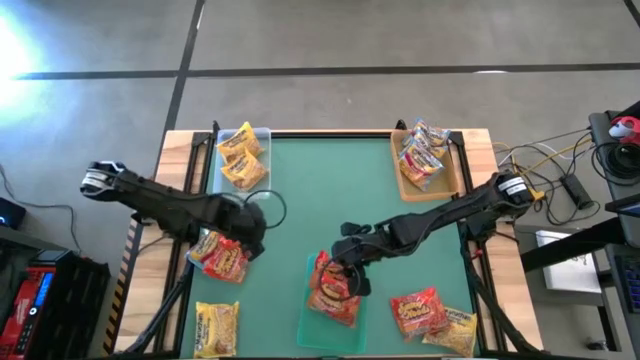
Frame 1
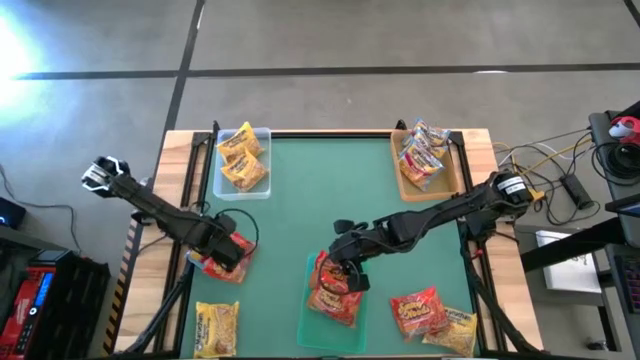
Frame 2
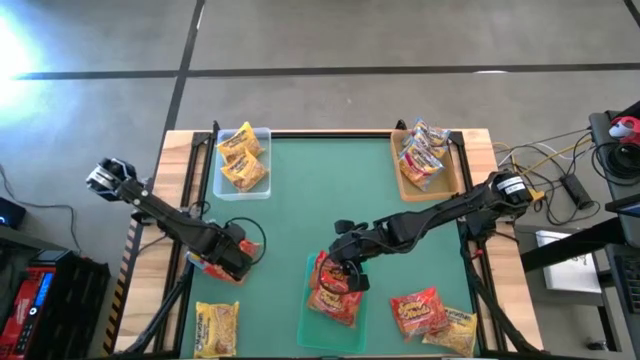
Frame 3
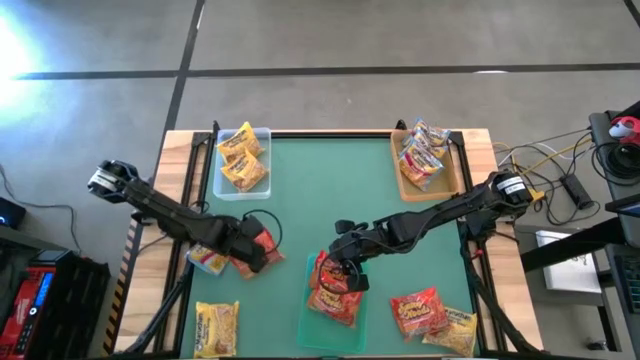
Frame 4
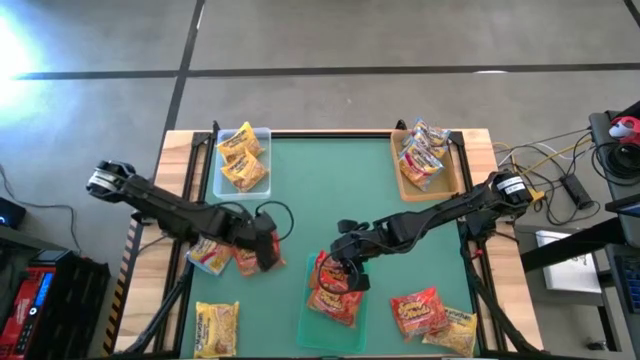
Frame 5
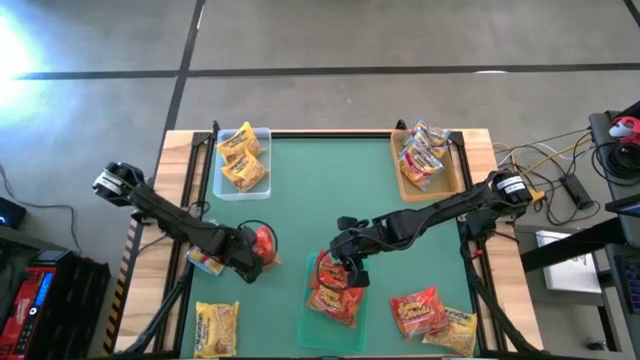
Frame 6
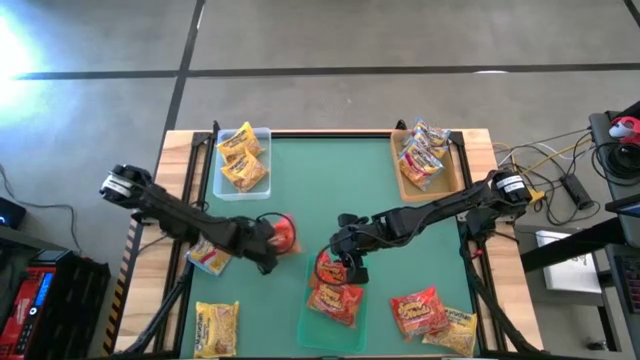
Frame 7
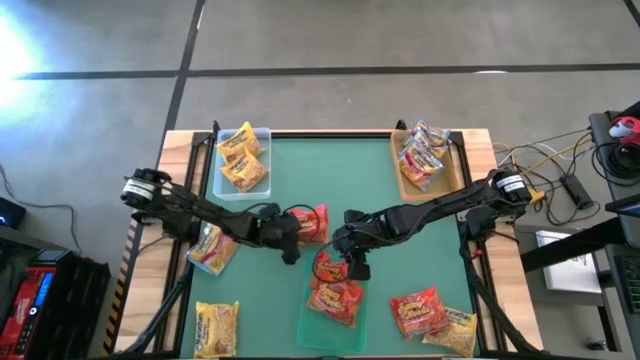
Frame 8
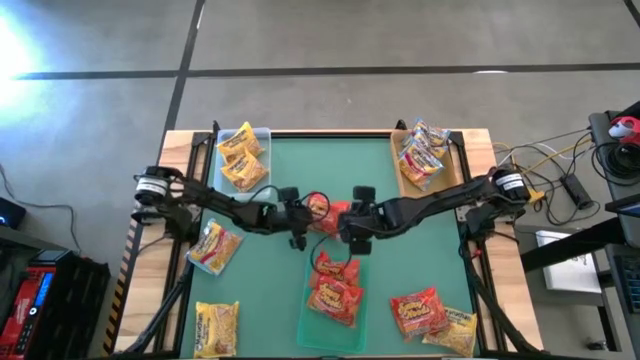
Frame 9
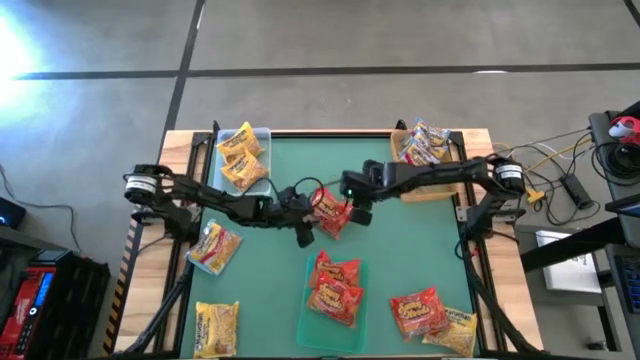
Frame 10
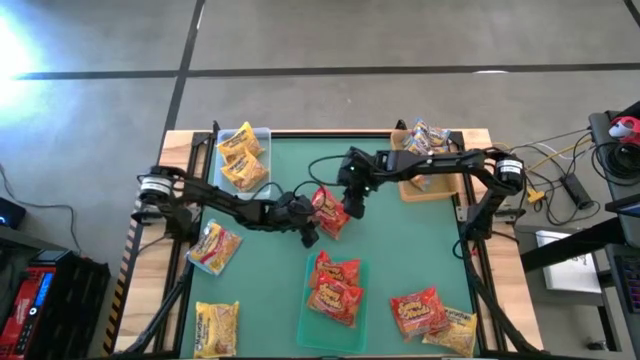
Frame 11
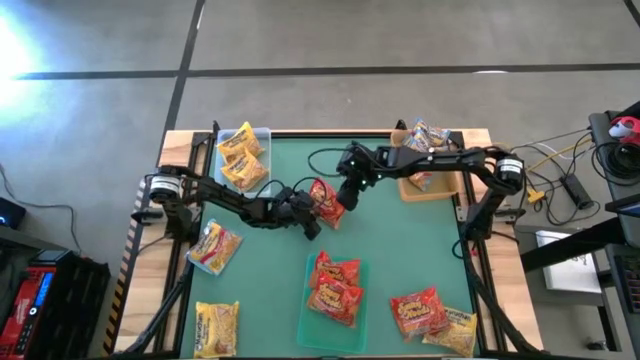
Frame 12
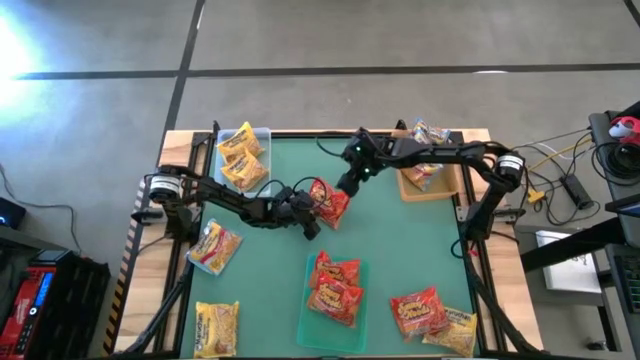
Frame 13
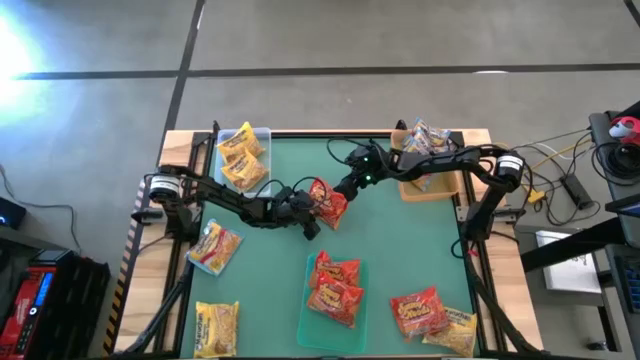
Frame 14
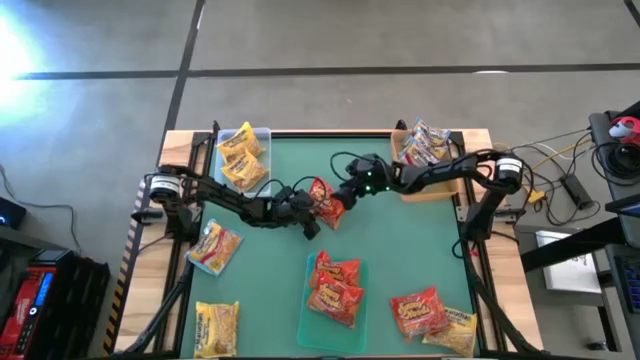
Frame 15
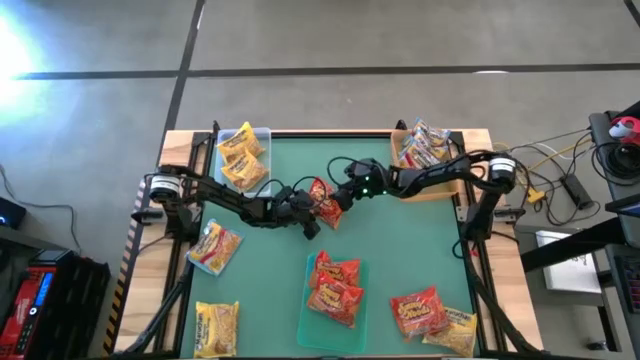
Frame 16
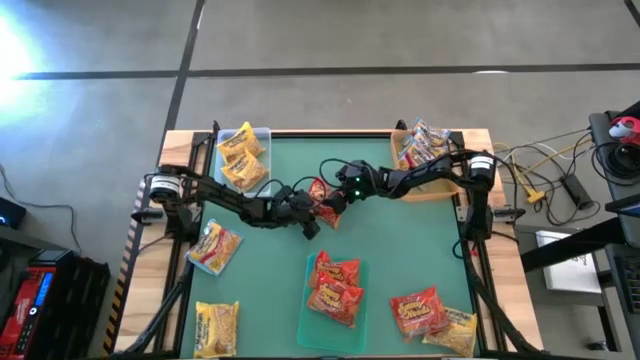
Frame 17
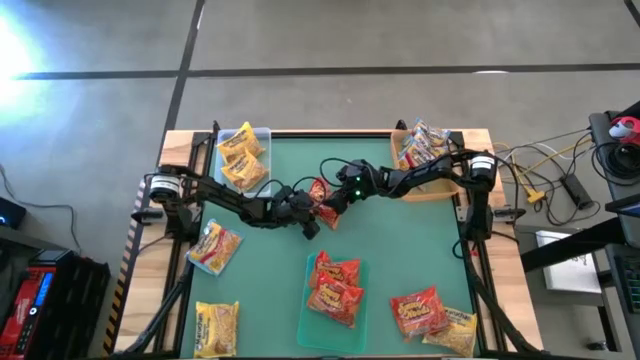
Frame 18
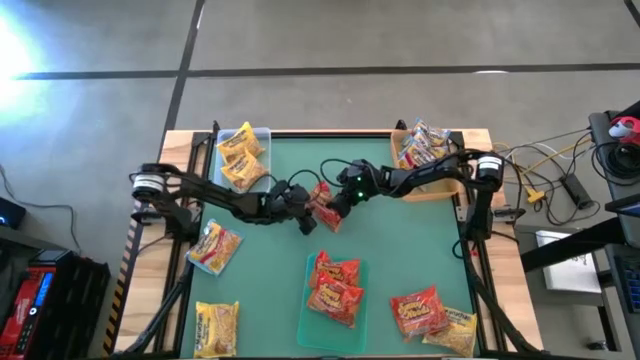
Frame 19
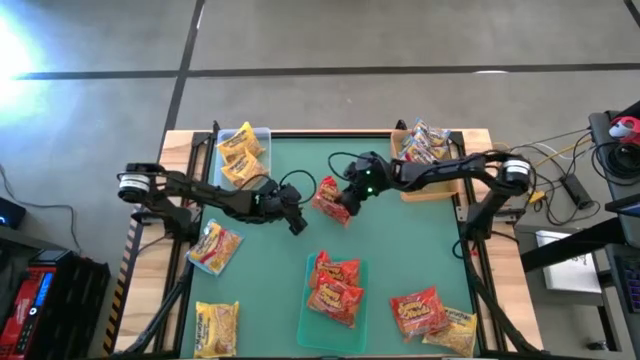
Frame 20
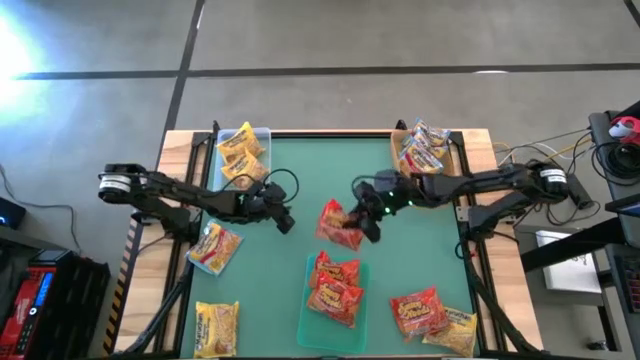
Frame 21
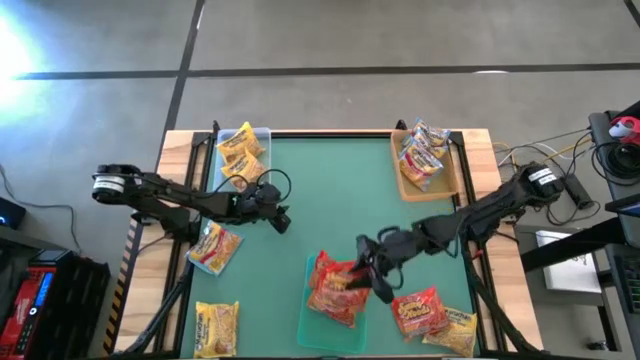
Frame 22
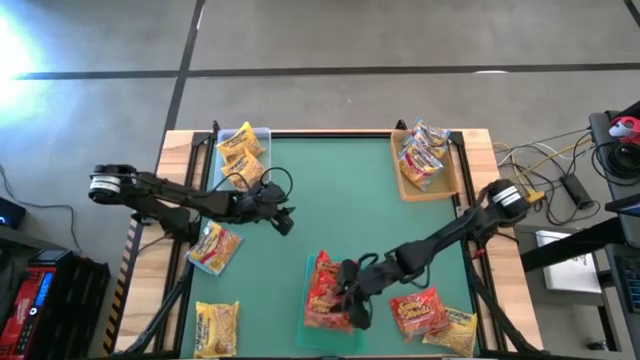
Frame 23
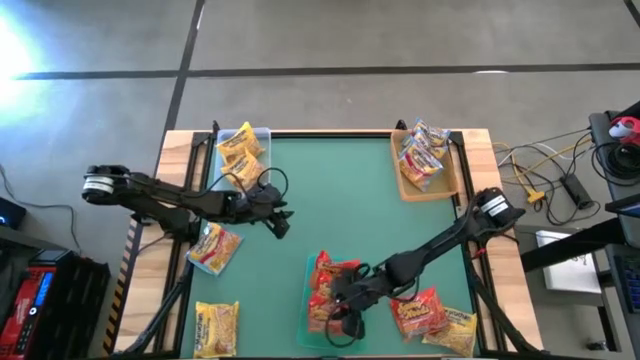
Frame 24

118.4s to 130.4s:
Task: Sort Maruchan noodles
Put the red noodle pack into the green bin

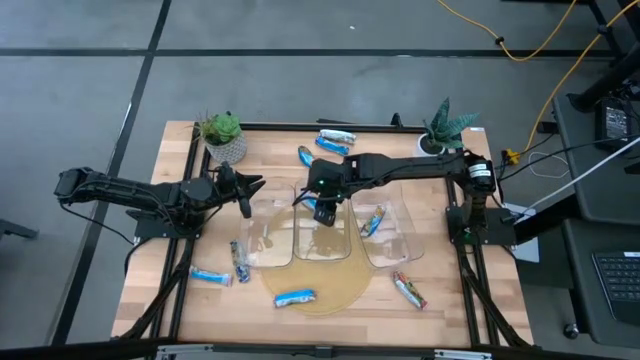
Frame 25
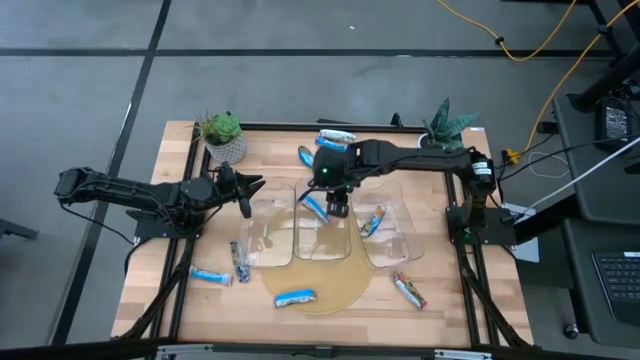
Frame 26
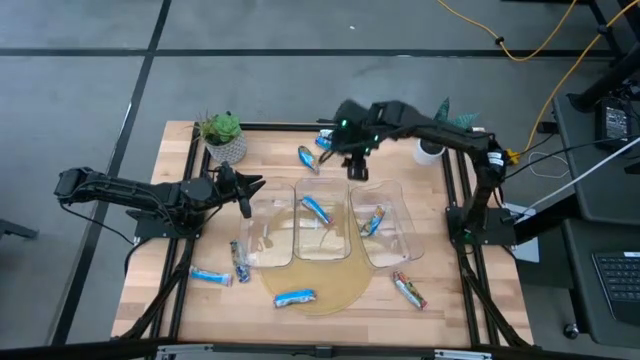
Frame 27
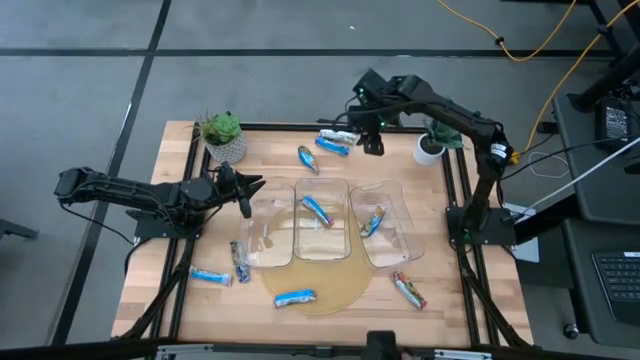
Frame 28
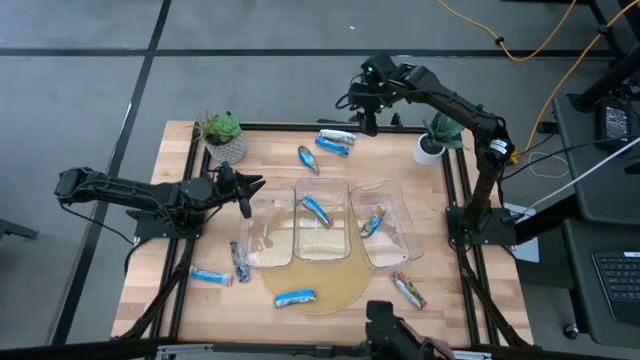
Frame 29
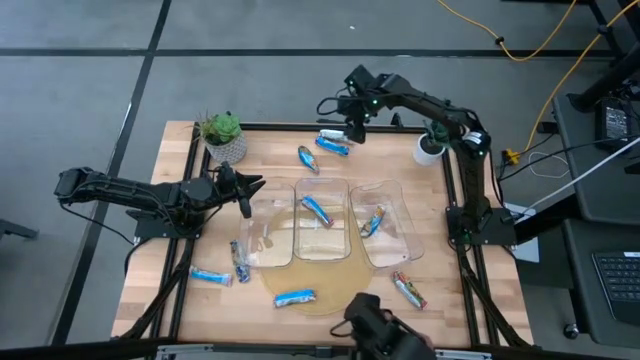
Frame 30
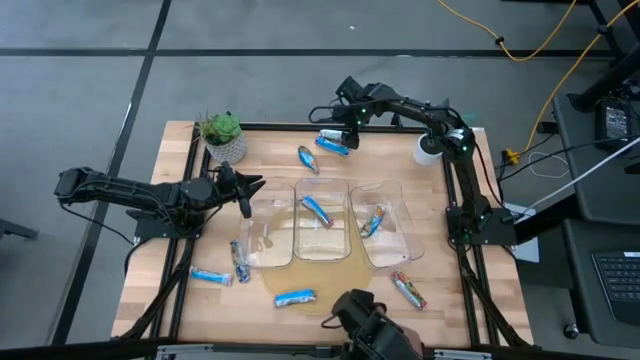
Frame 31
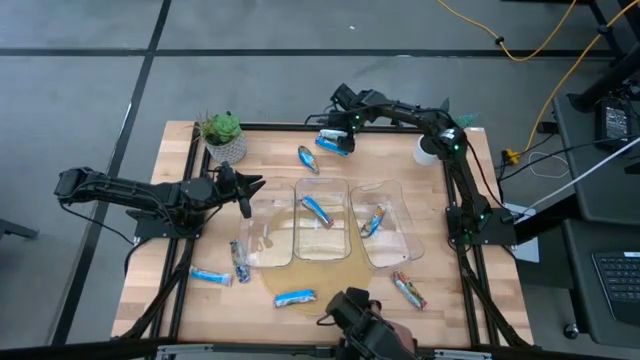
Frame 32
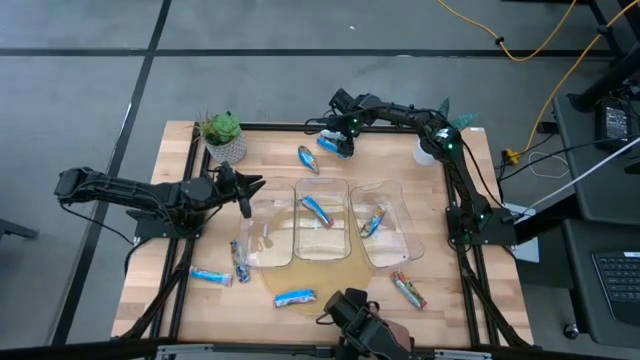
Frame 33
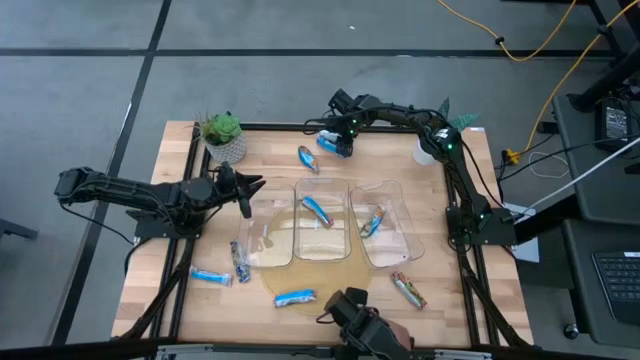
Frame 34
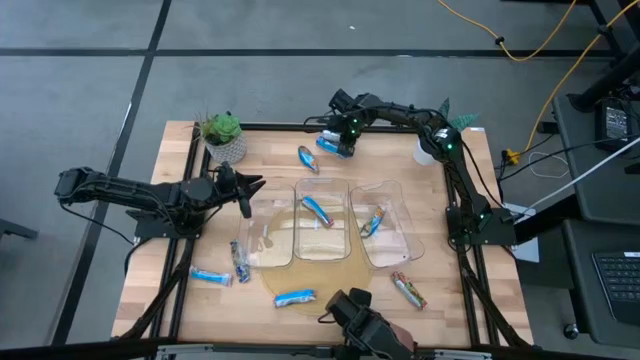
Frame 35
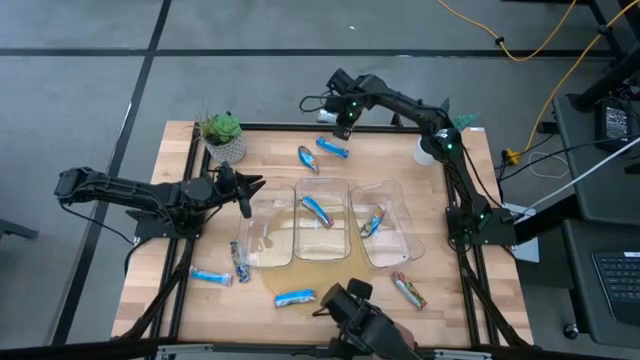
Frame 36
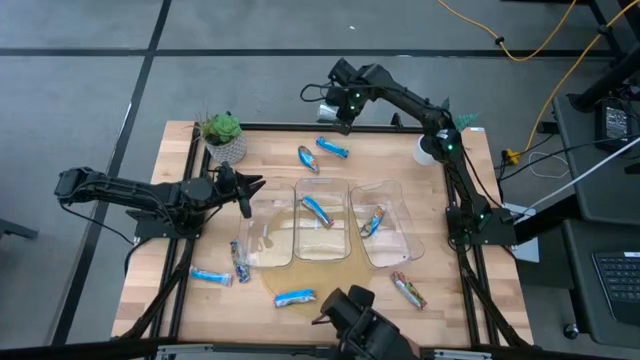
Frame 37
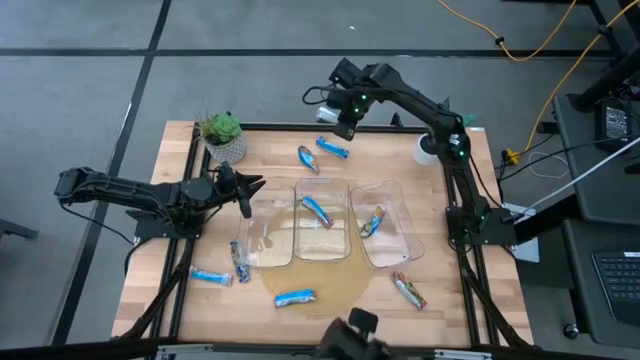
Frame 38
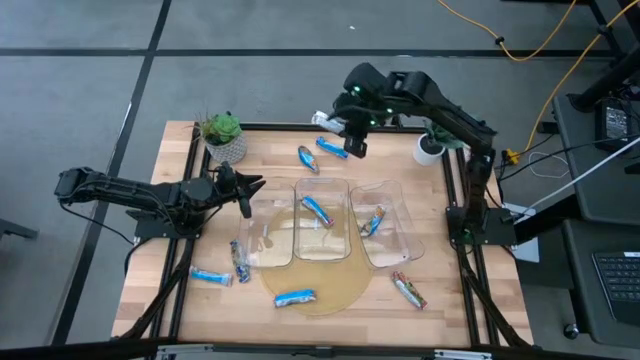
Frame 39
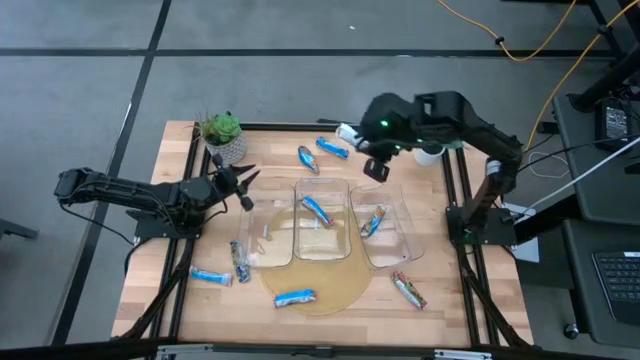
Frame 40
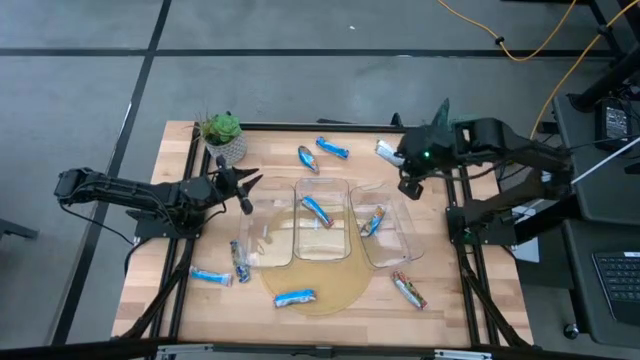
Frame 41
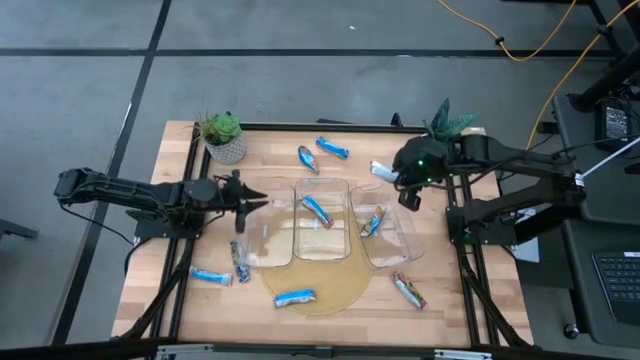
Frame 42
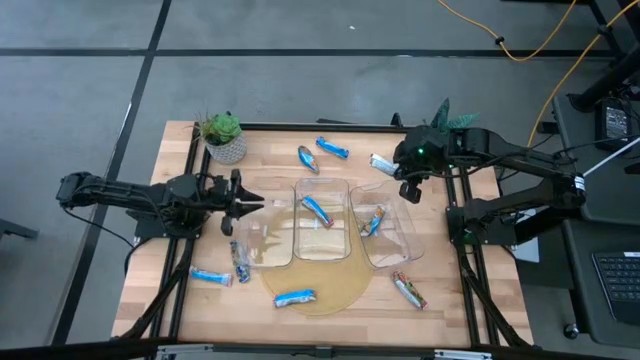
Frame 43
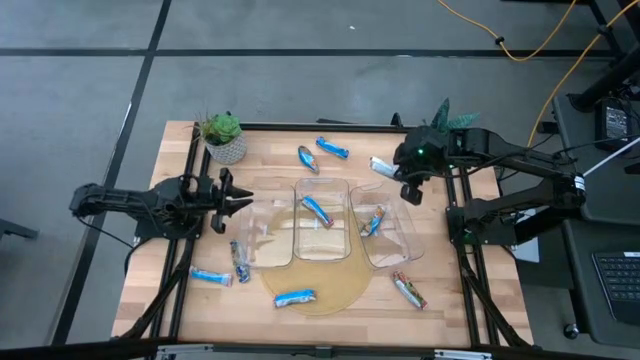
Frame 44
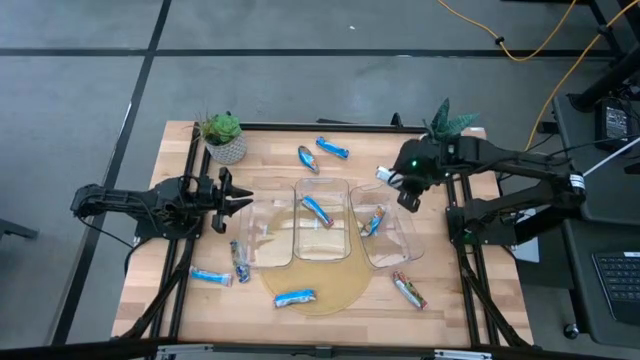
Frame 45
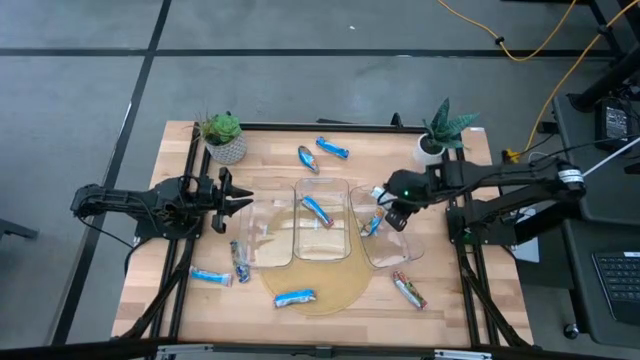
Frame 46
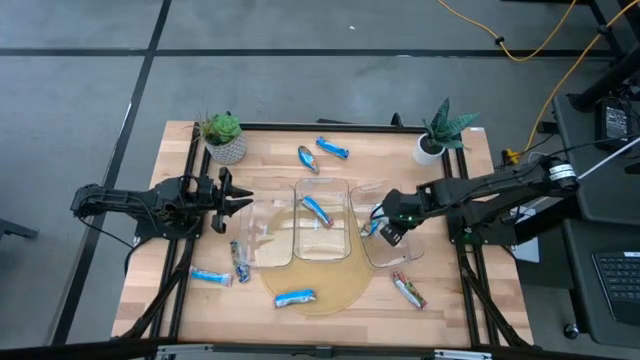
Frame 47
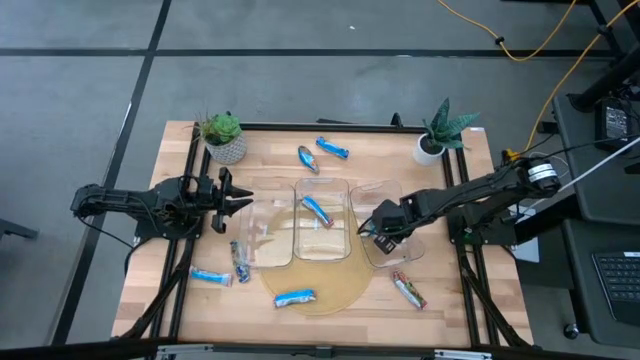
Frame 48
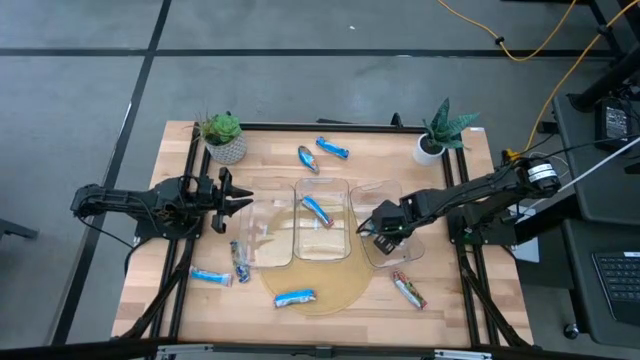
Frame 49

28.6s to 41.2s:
Task: Pick and place Granola Bars by type
Put the yellow granola bar into the right transparent bin
